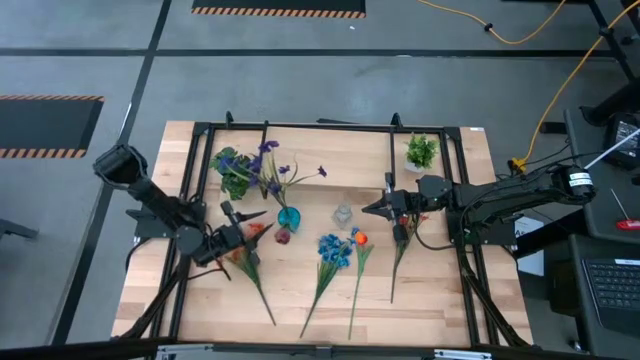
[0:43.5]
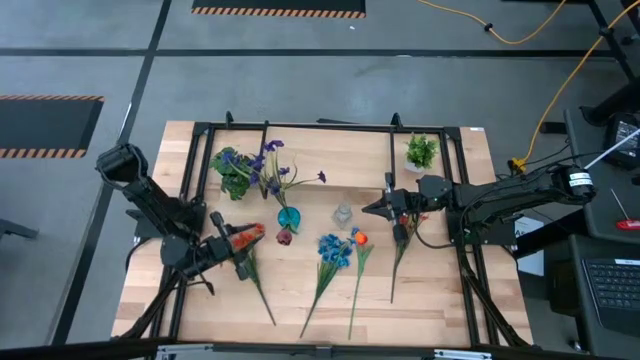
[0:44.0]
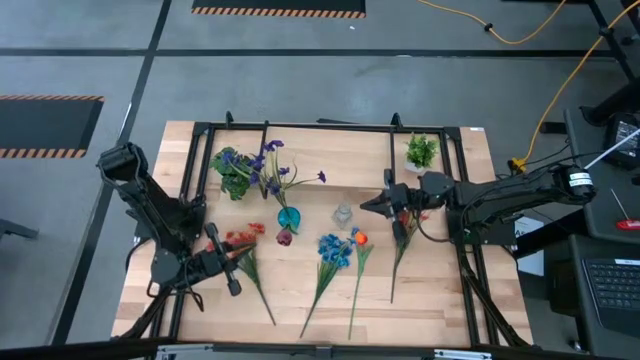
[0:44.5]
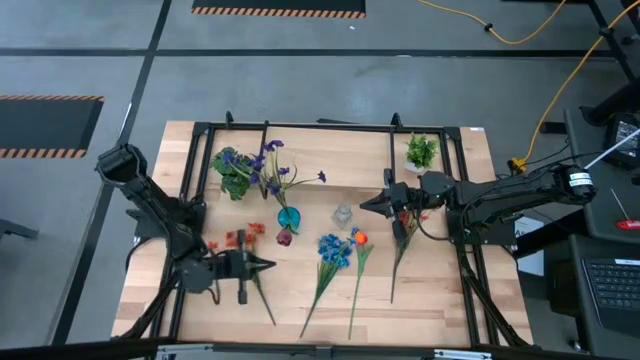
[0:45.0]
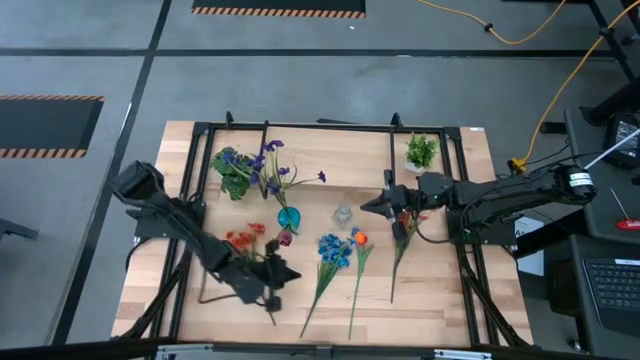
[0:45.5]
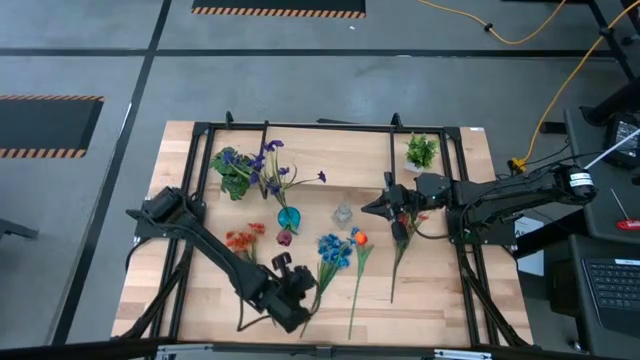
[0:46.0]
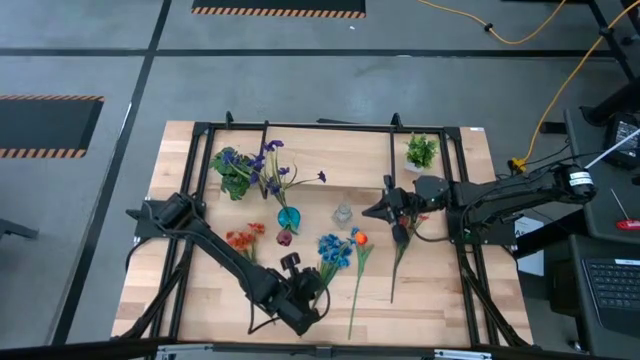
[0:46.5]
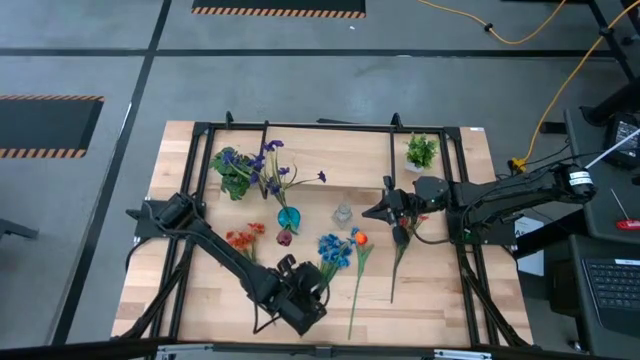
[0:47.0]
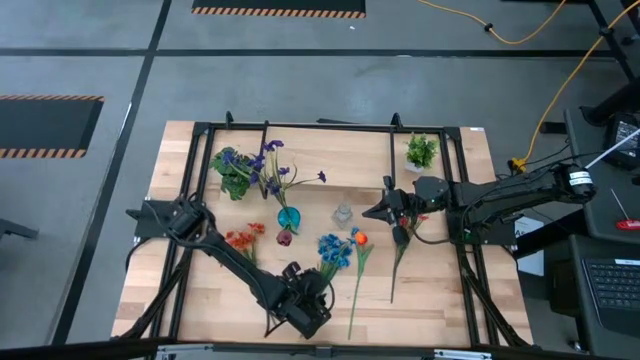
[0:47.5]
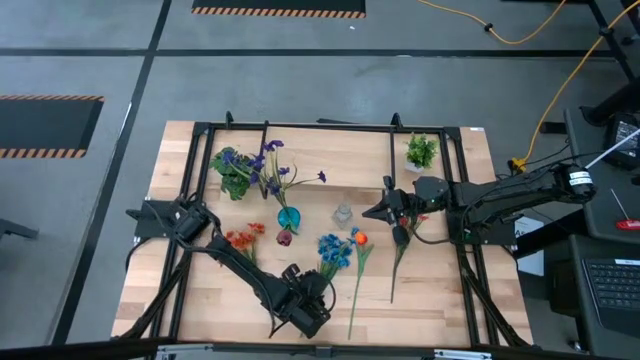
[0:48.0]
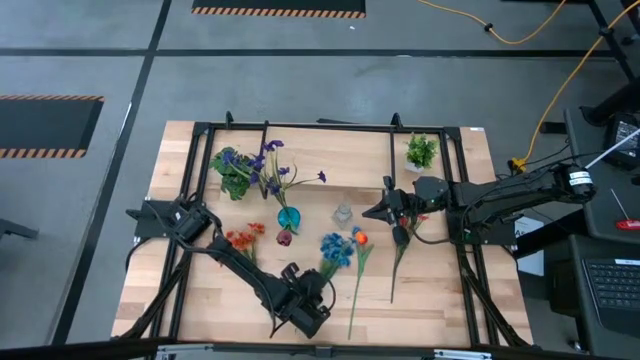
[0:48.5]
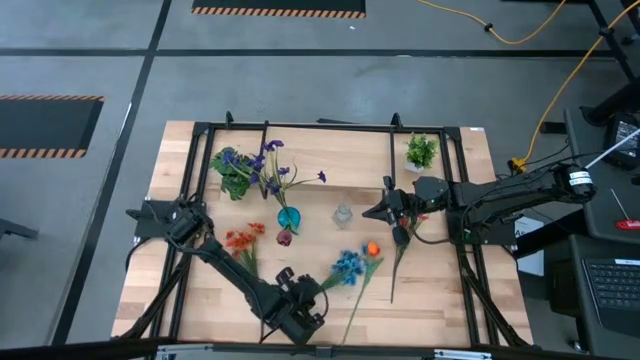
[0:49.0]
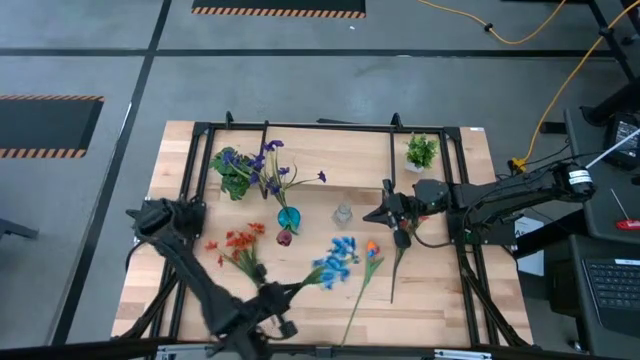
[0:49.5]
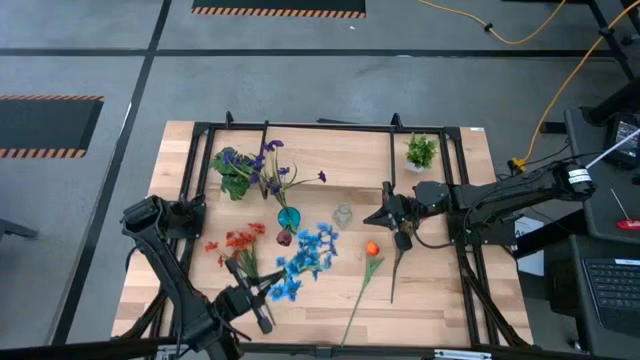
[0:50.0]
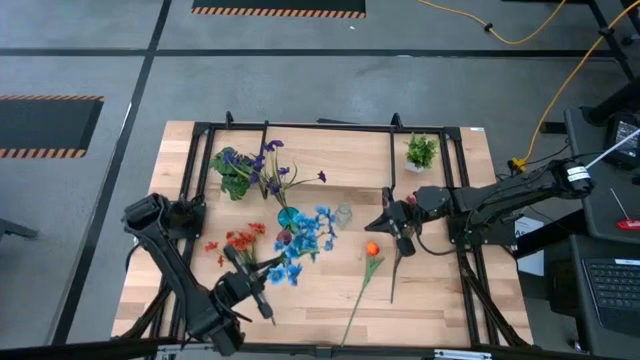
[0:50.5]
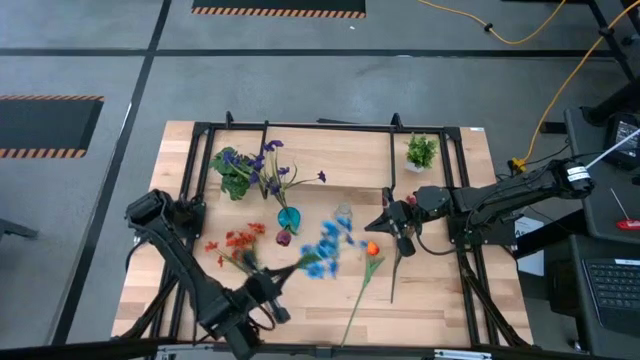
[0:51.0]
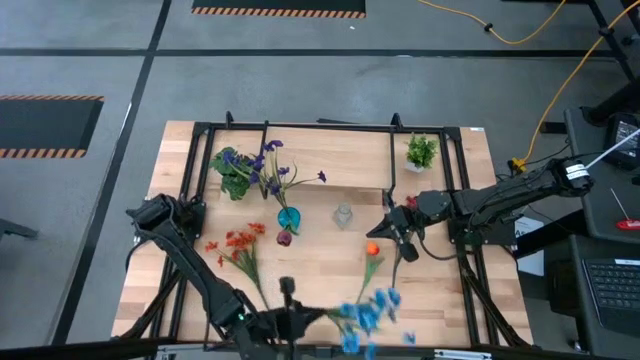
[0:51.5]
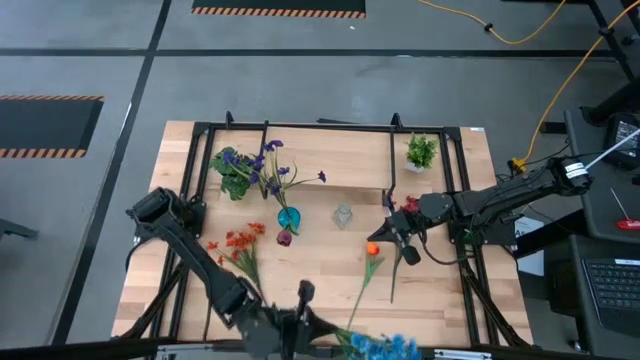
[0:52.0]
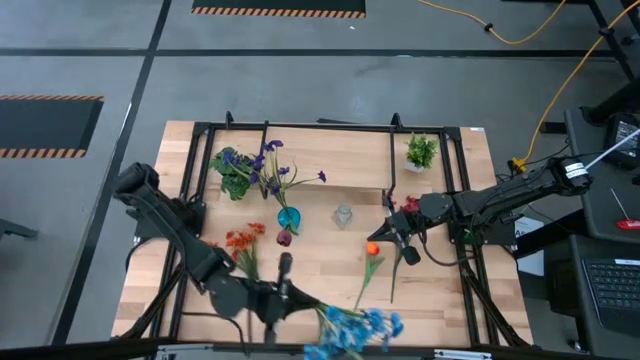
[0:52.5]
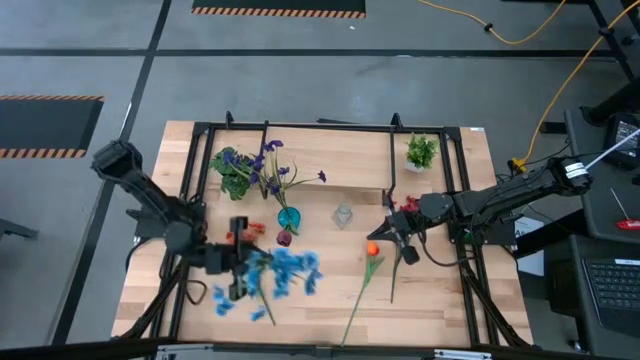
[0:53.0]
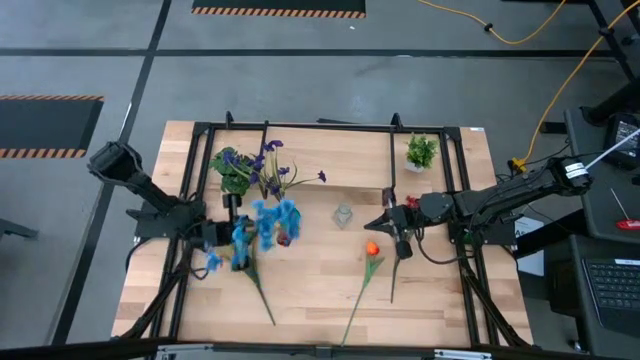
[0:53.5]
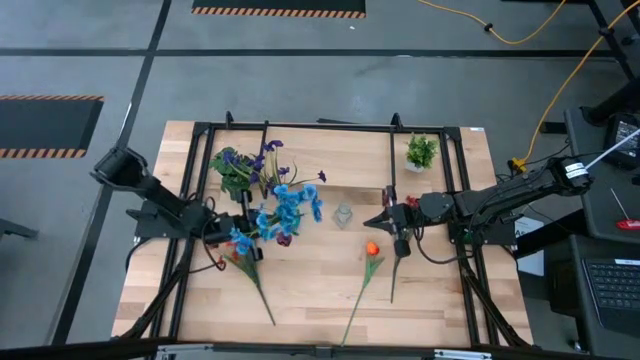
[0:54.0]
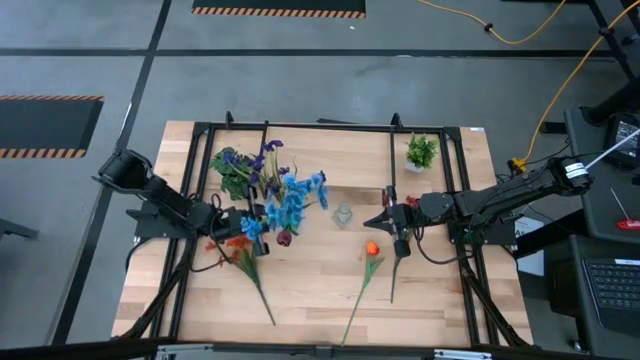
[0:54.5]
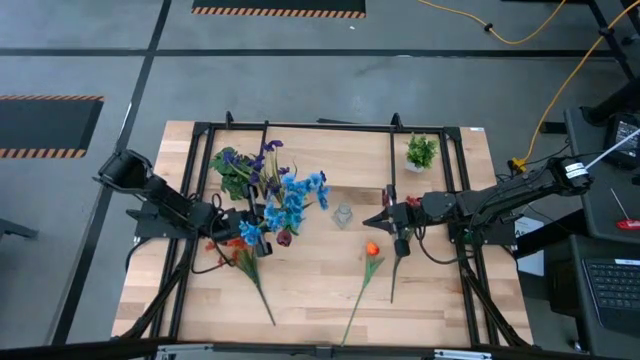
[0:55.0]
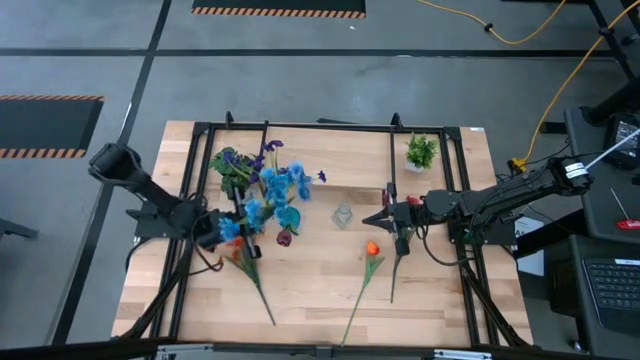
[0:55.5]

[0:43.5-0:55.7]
Task: Pick and place flowers into a vace then onto a shelf
Put the blue flowers into the transparent blue vase

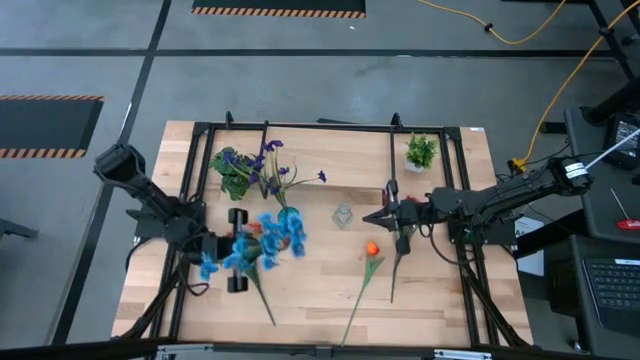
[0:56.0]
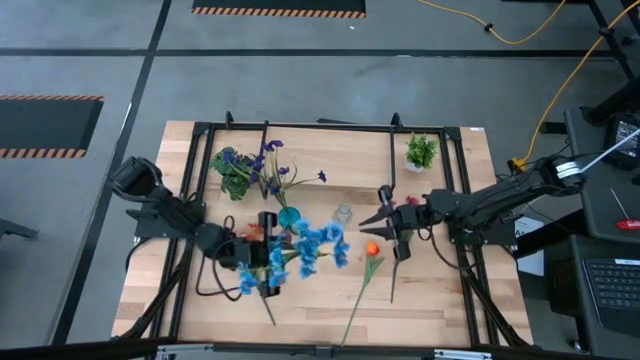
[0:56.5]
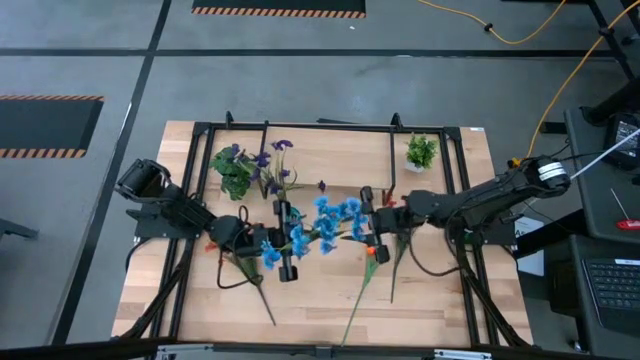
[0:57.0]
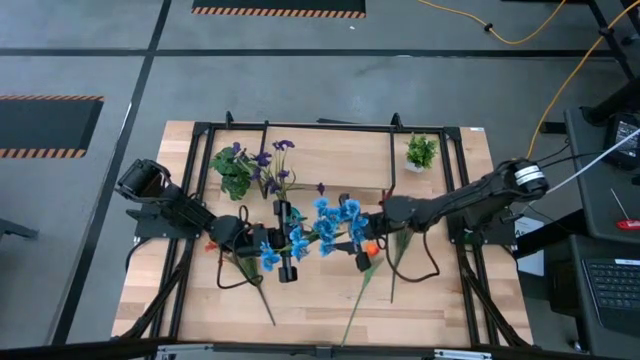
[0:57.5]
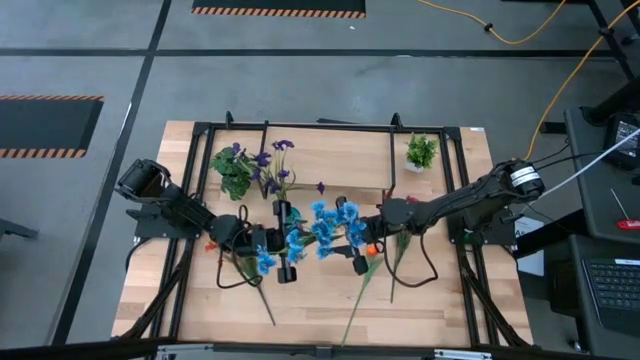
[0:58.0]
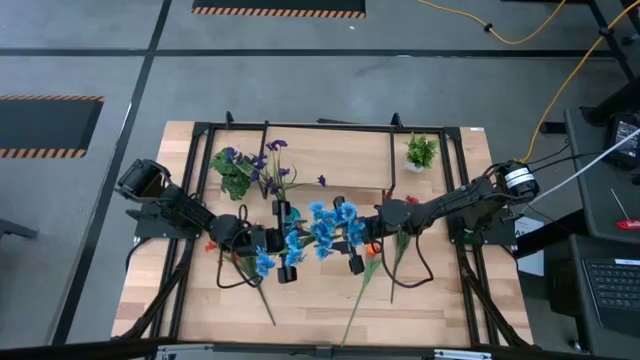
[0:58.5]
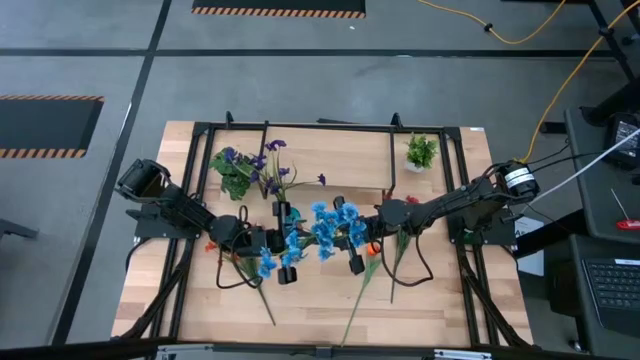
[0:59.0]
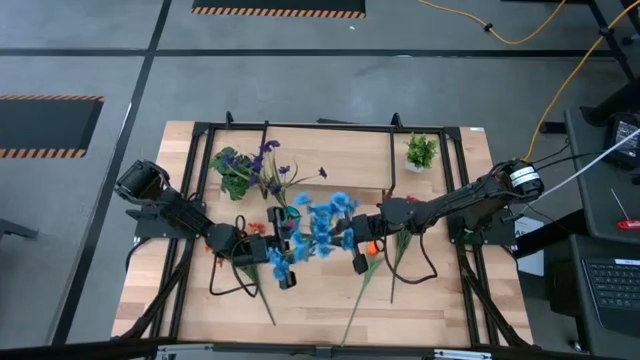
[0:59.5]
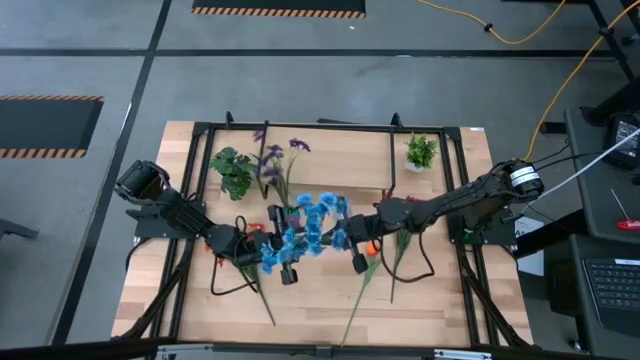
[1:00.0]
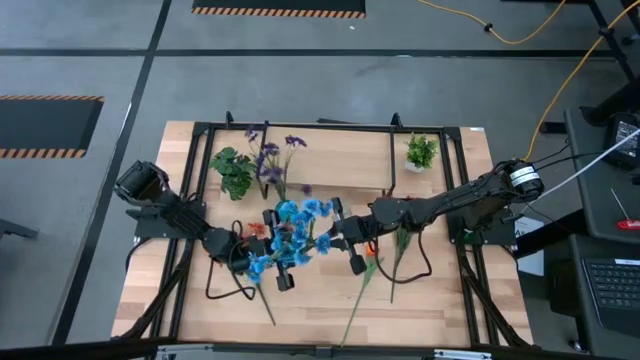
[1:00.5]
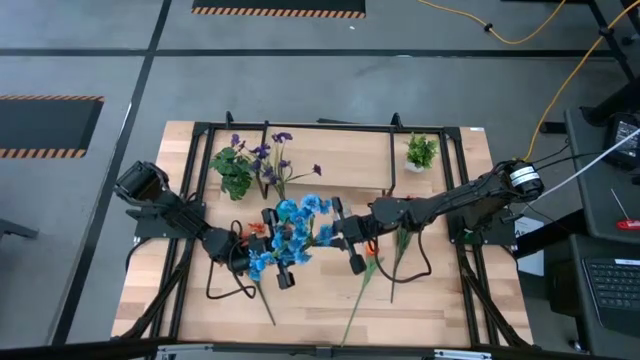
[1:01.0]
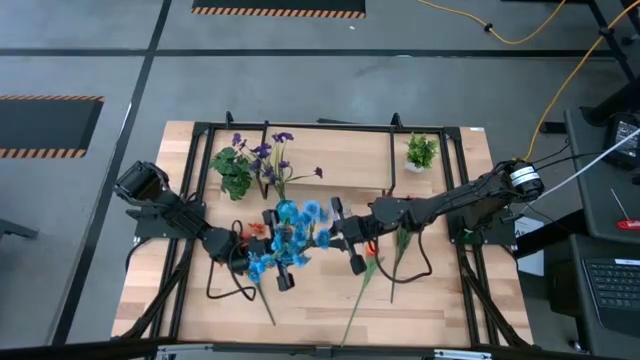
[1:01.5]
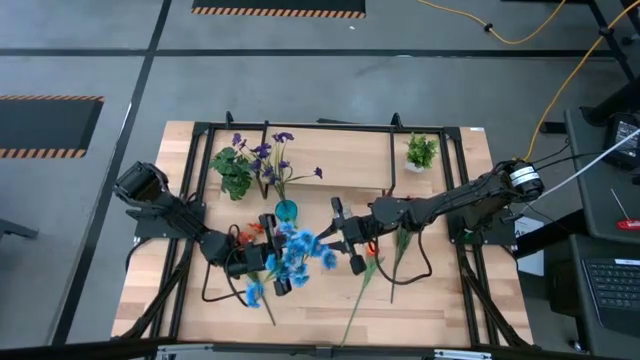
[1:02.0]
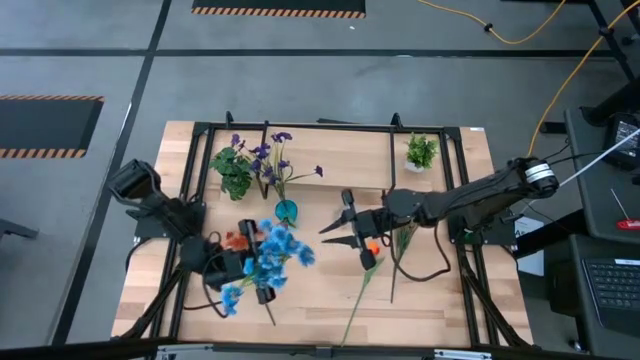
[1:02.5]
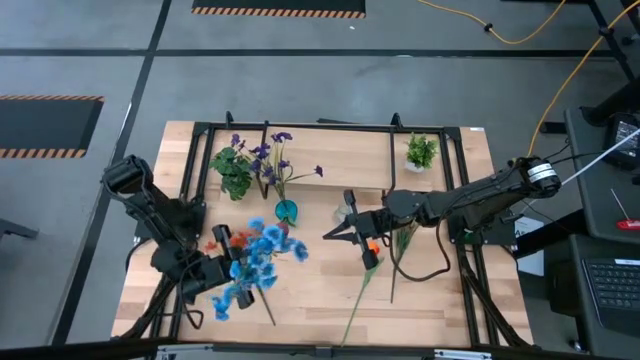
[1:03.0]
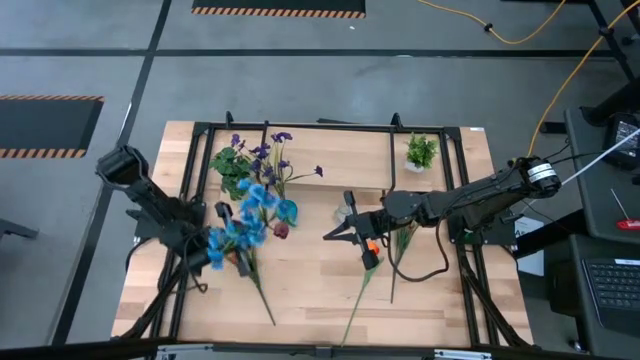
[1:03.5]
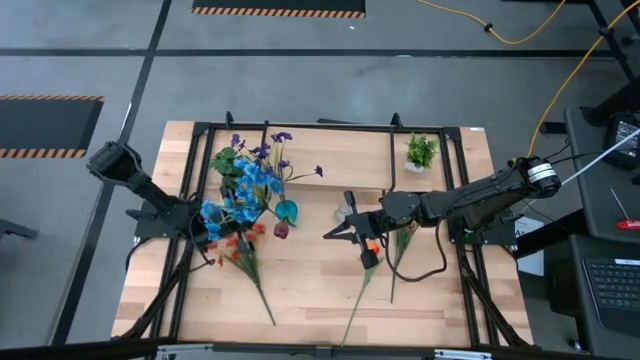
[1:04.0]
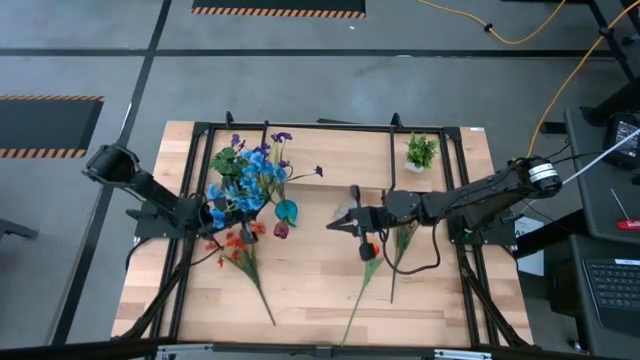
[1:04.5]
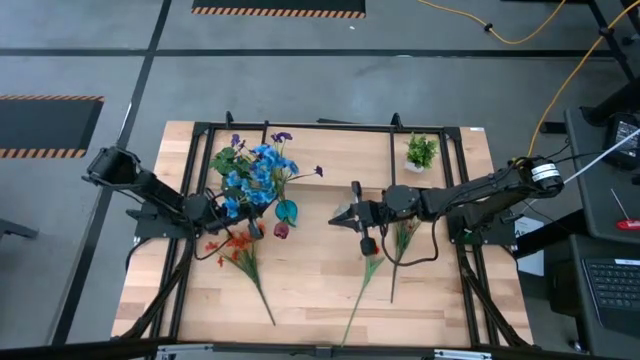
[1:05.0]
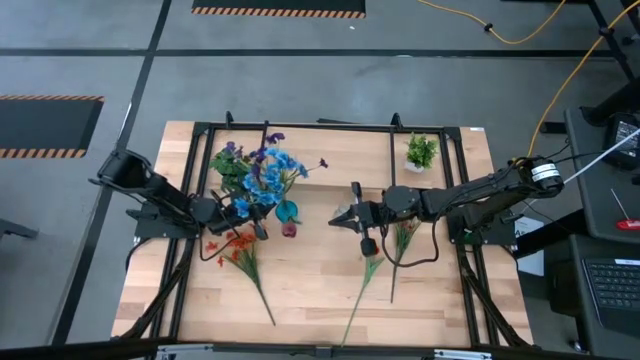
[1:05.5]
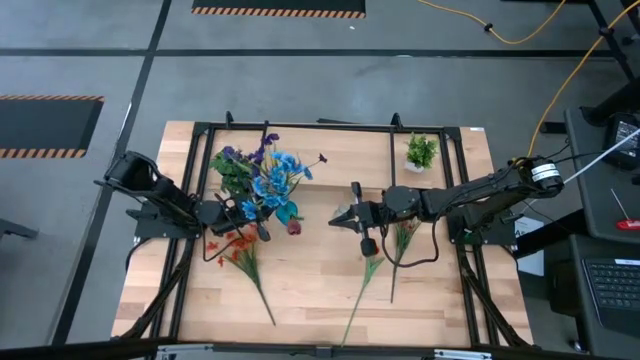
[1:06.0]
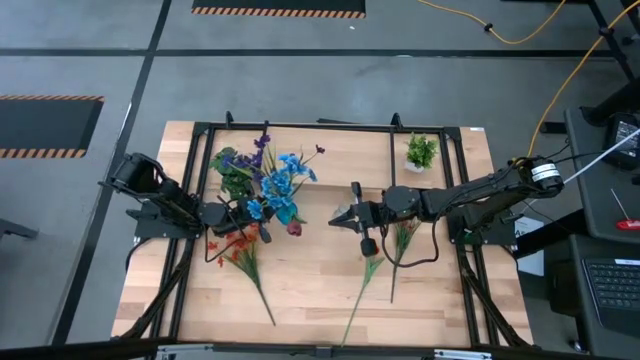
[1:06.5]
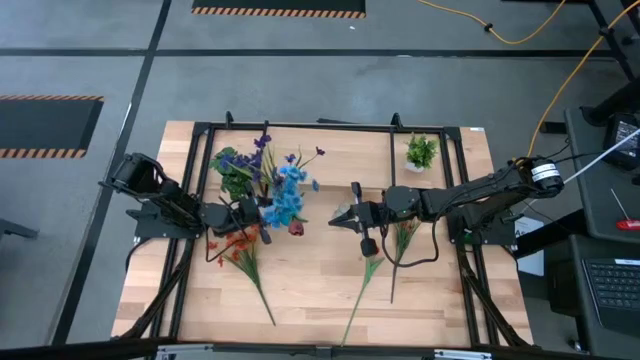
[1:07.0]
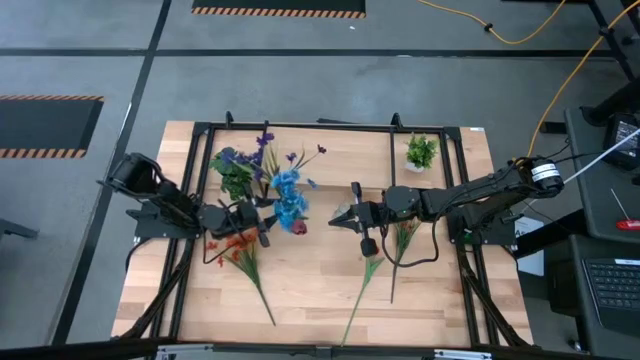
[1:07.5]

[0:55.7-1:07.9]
Put the blue flowers into the transparent blue vase
